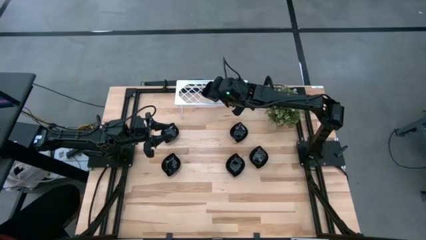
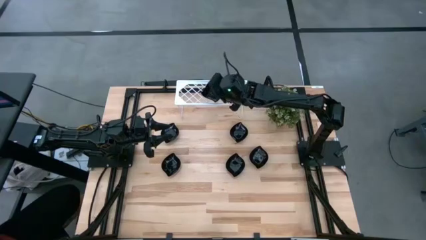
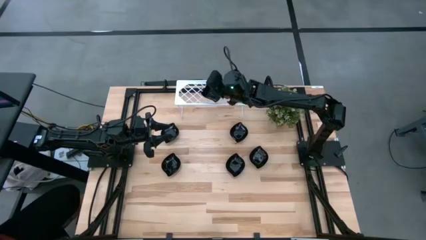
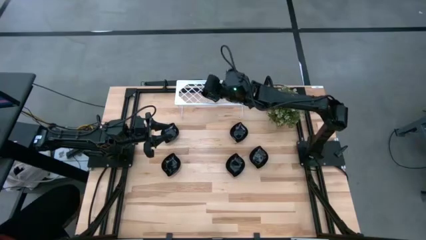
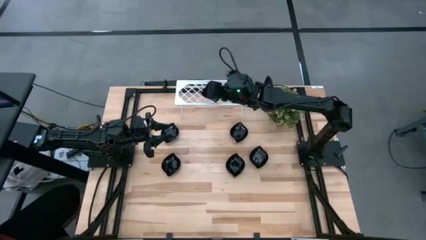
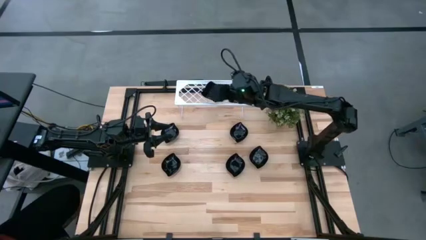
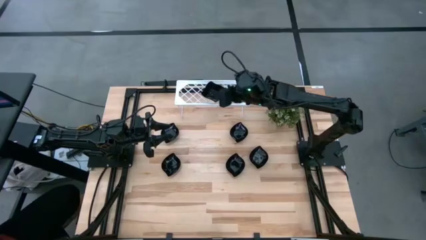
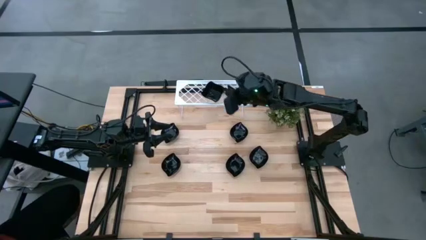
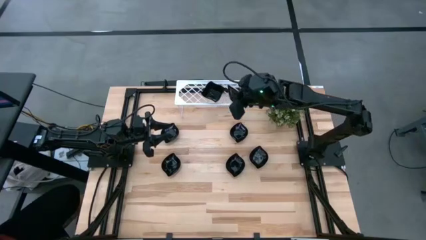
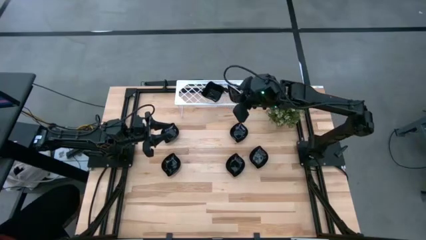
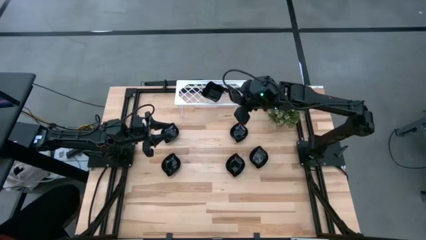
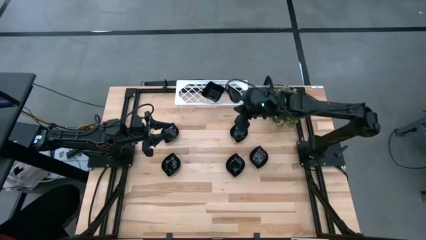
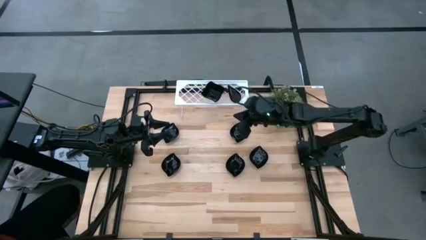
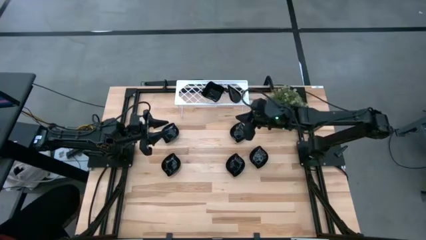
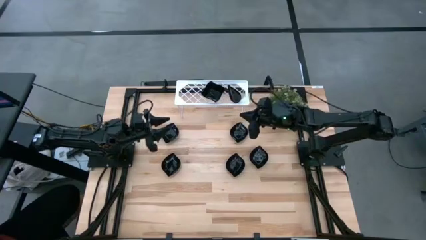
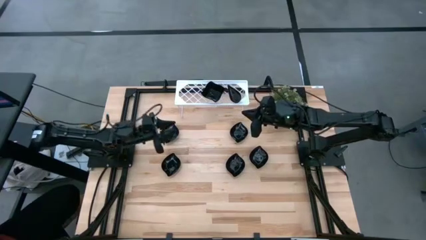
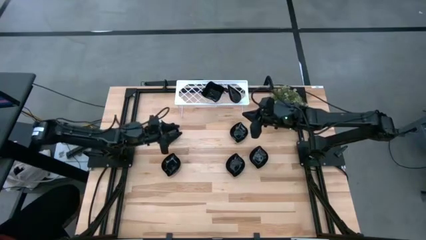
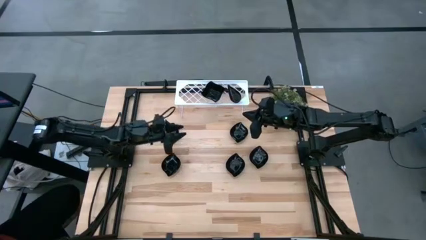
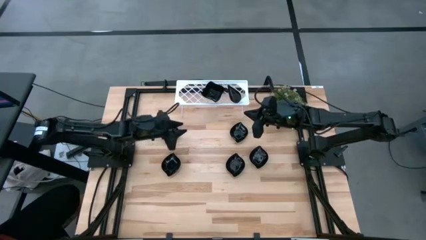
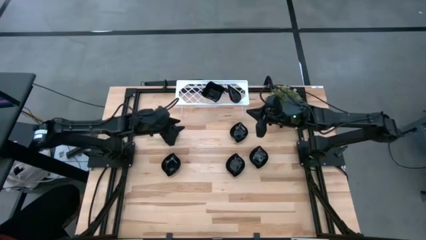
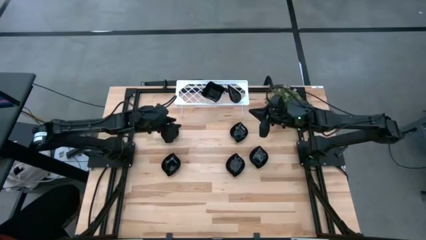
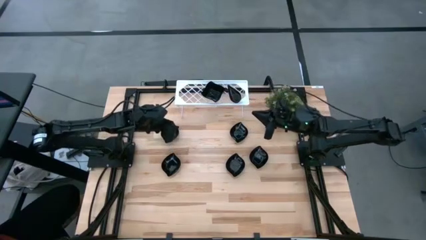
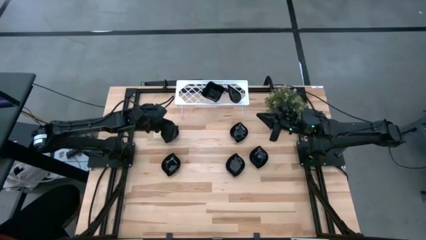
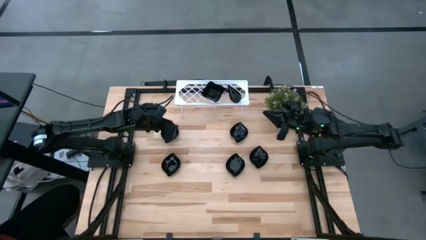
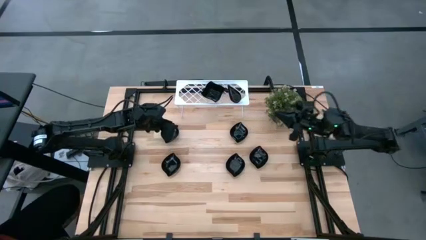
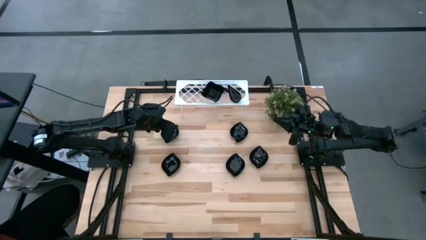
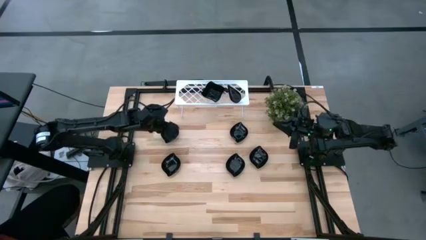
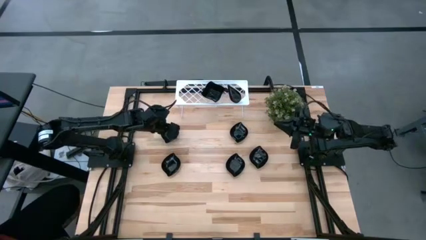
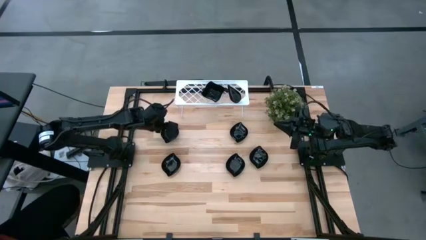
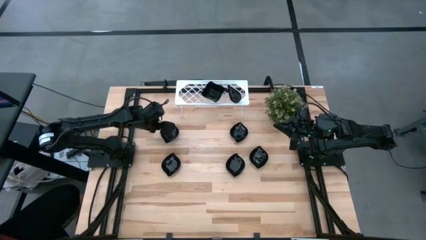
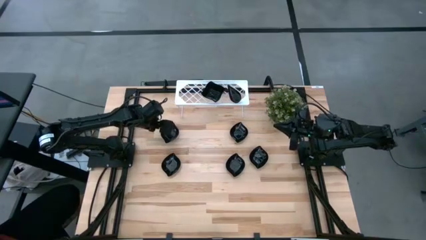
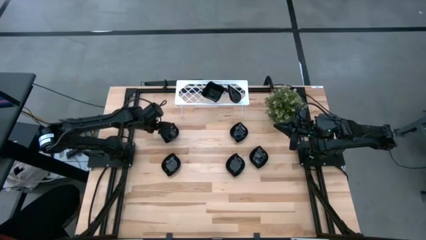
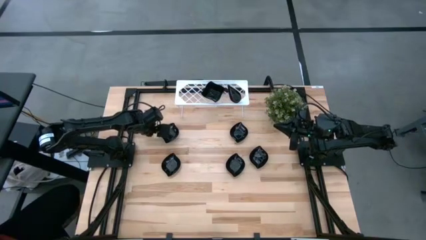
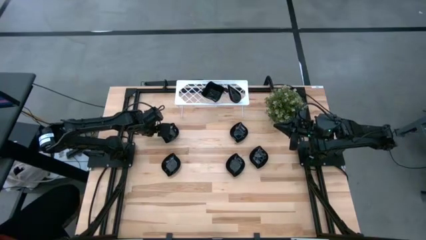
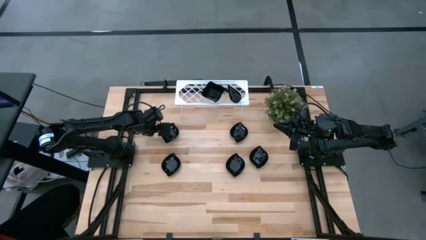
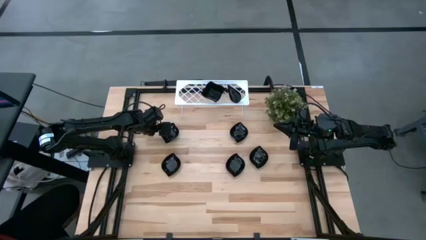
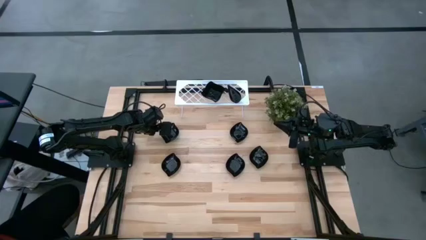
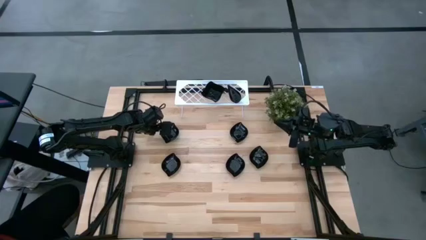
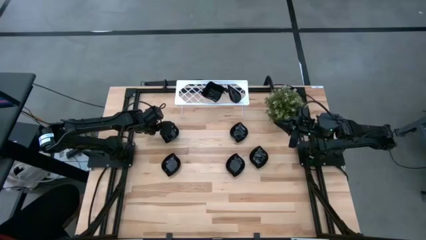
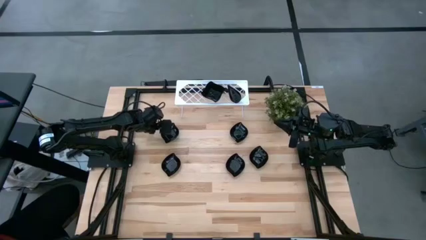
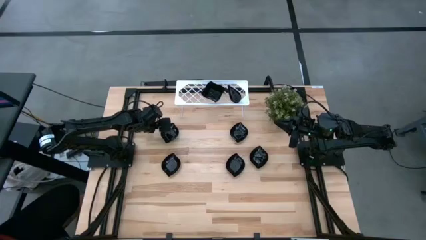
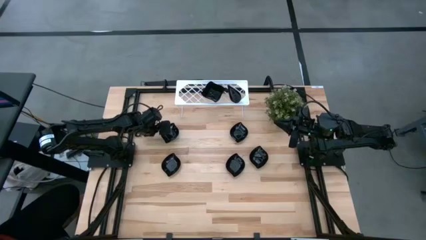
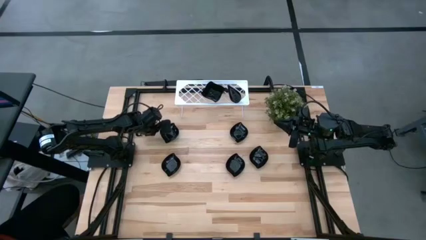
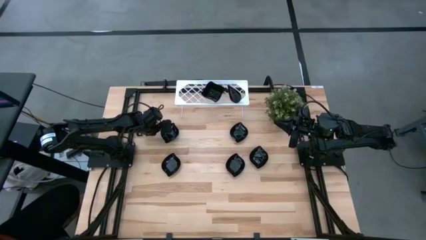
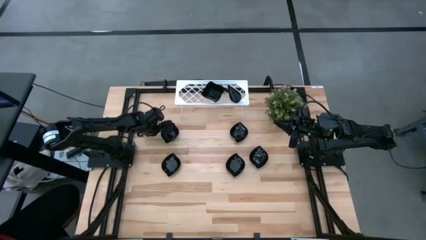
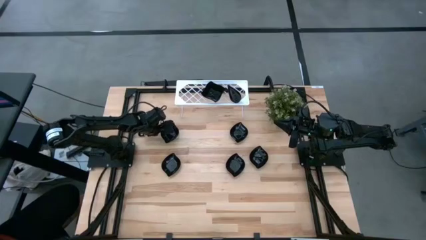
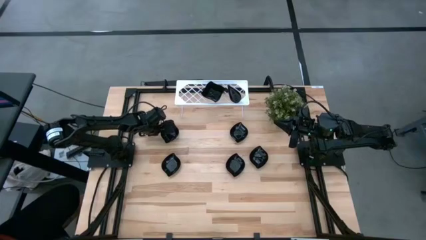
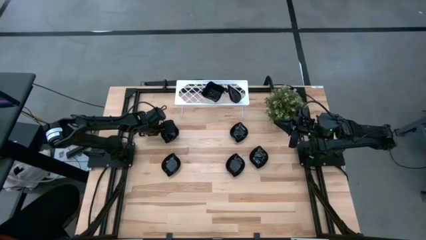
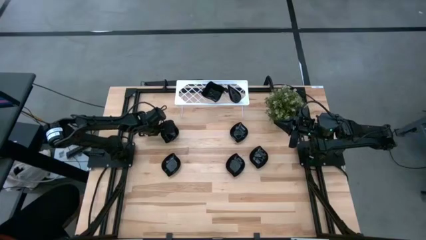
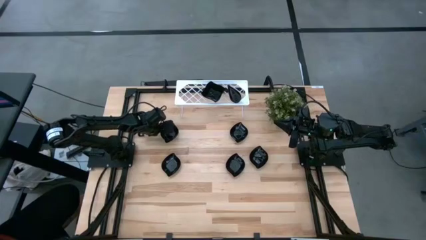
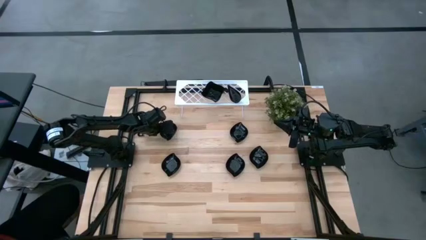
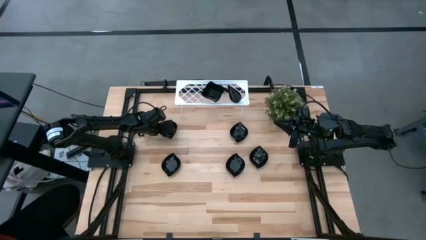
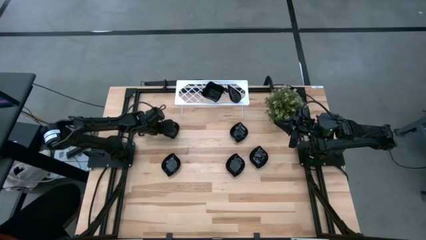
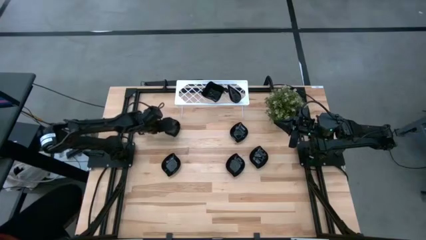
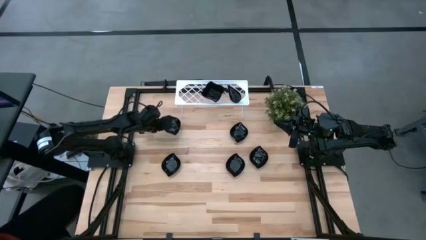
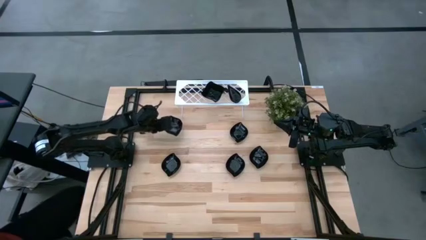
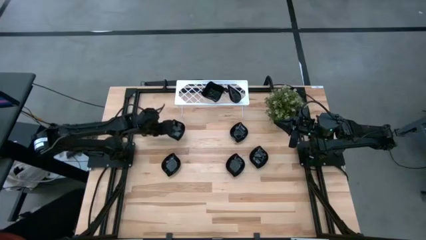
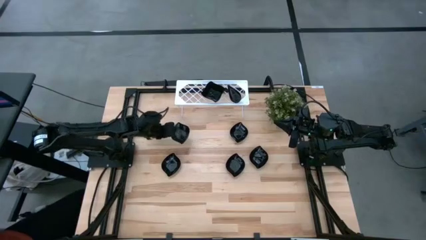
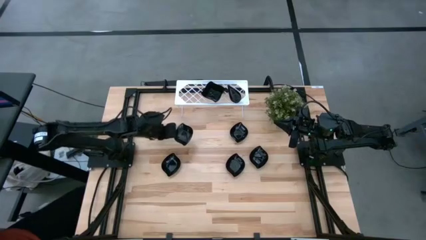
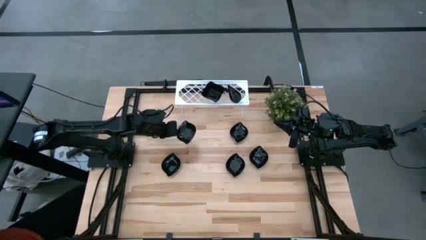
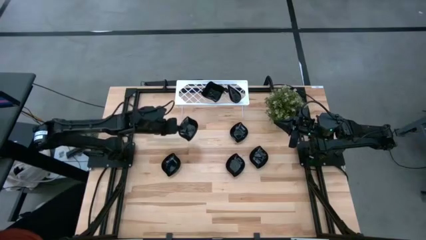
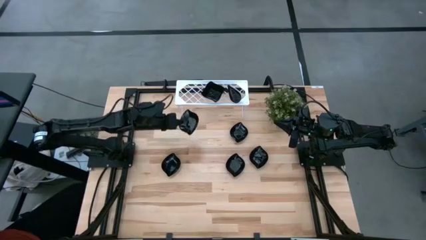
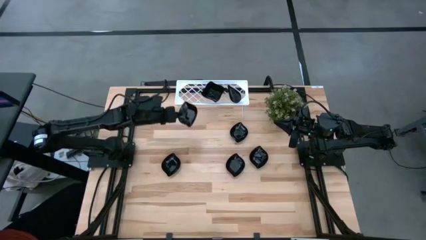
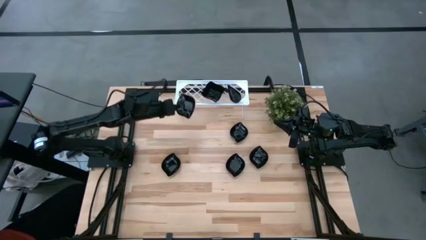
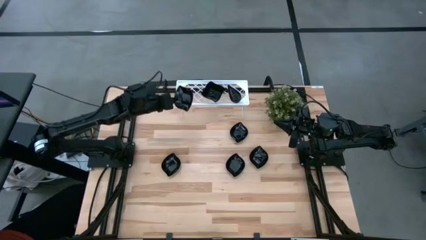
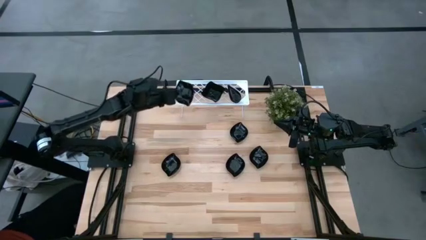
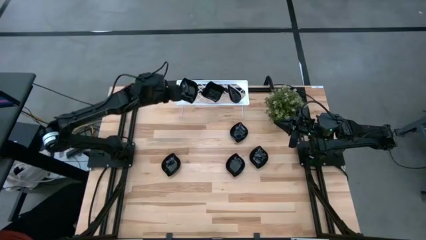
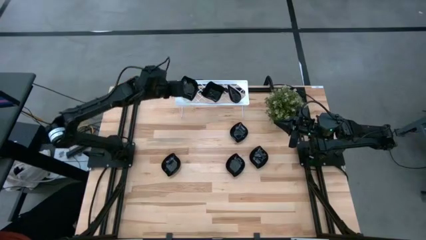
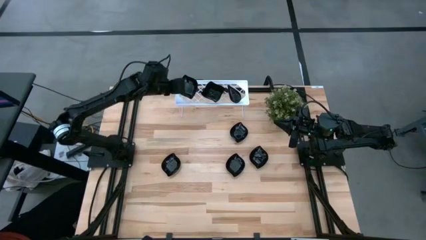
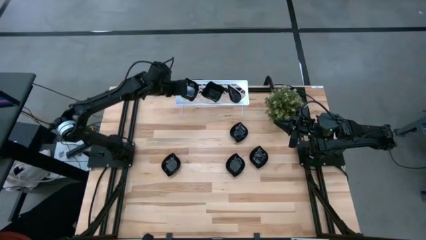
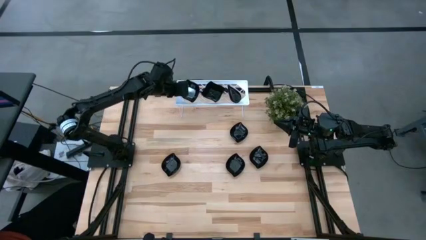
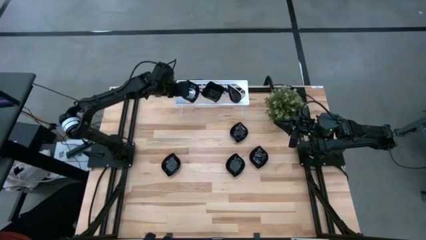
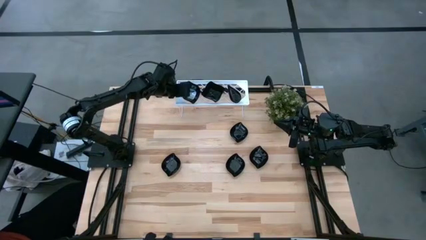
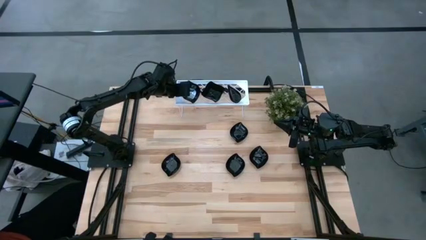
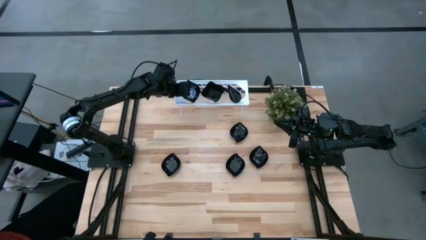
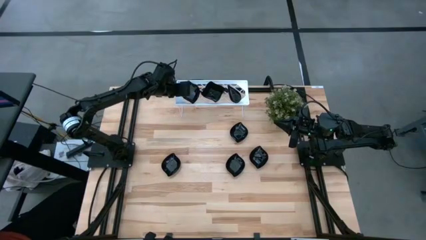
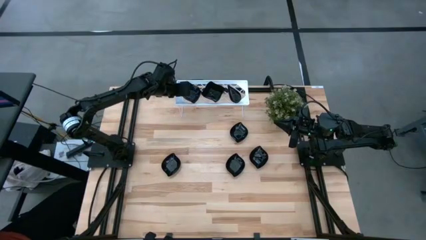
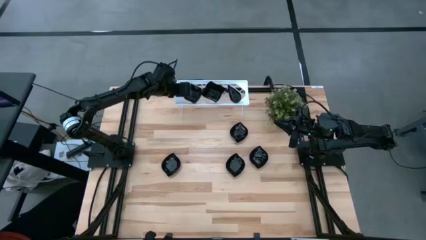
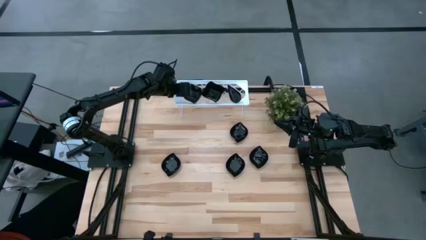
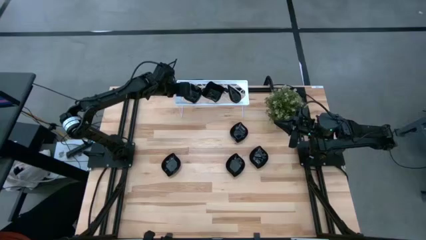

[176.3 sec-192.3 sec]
Task: Pick & Place Mini shaped plates
Put the leaf-shaped plate on the shelf

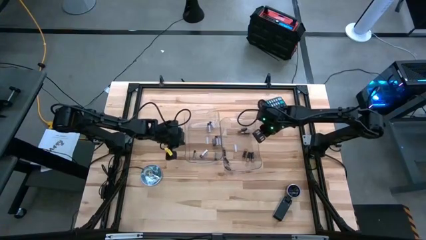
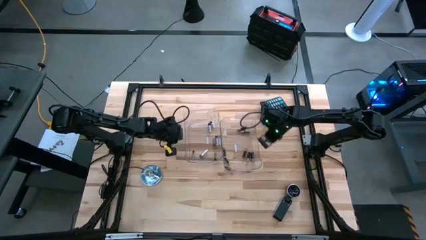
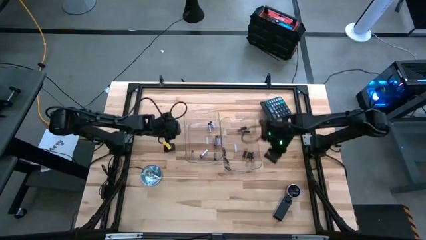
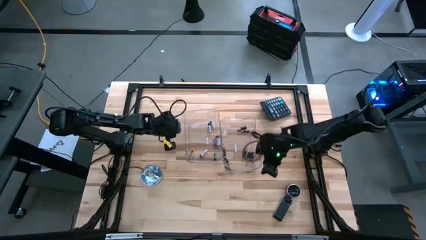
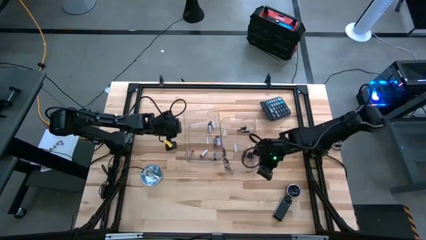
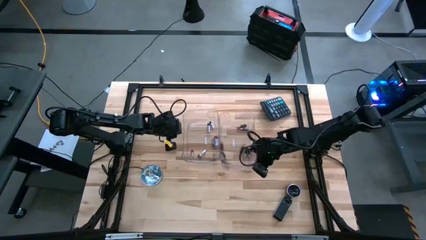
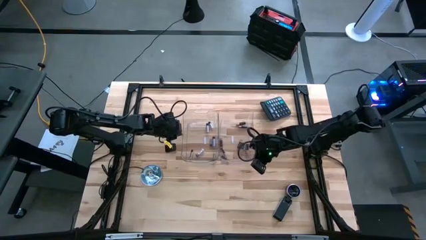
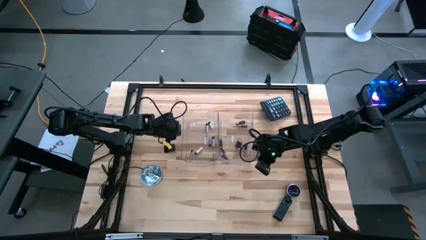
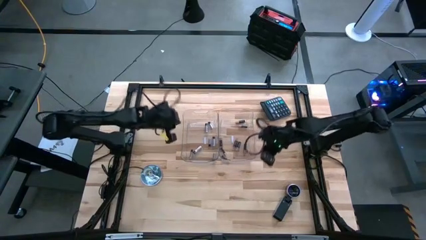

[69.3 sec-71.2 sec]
Task: Sort batteries
Adjust the right transparent bin
